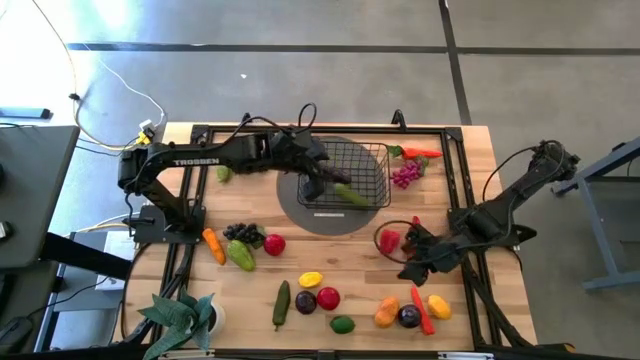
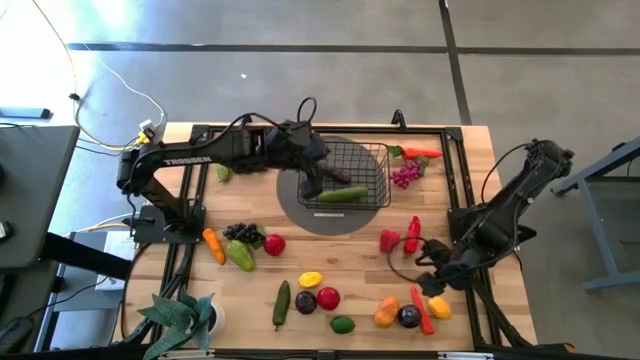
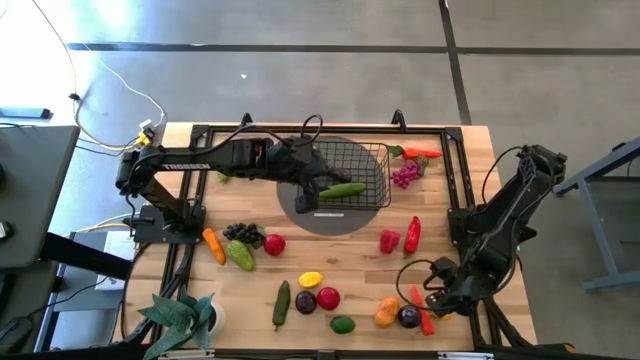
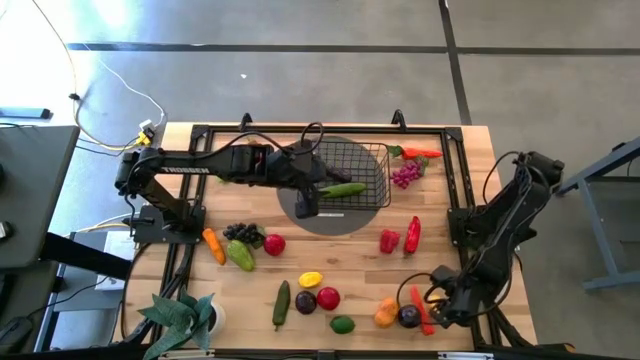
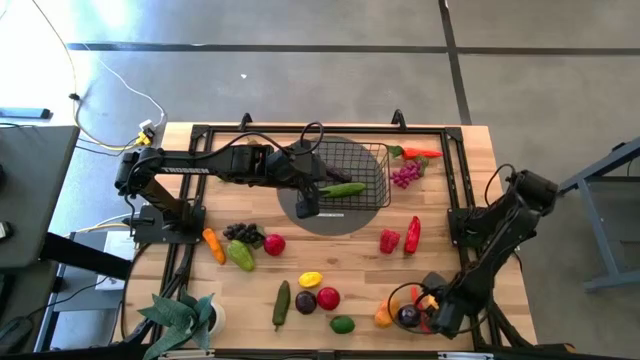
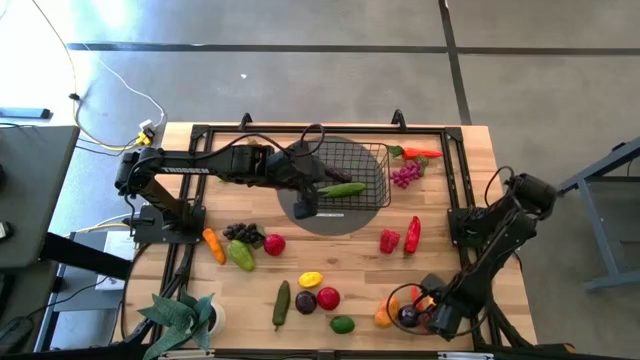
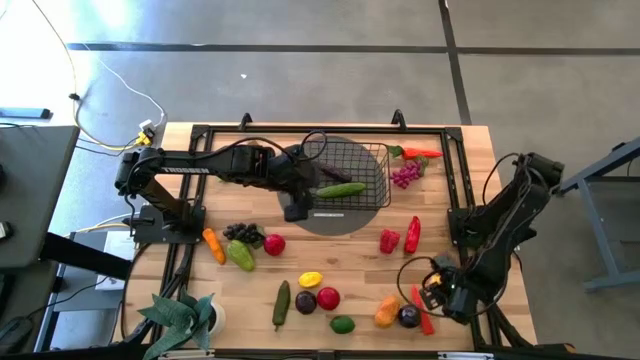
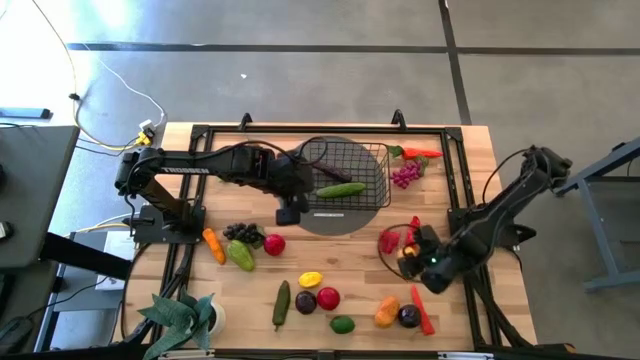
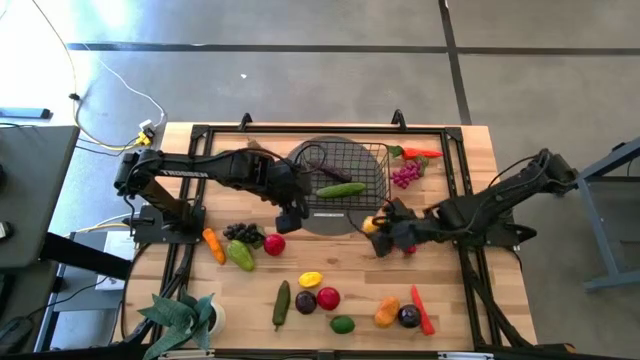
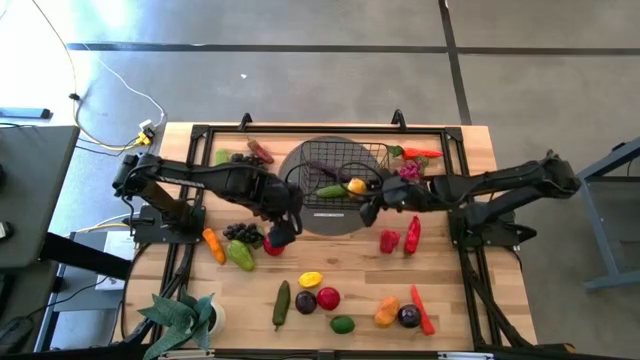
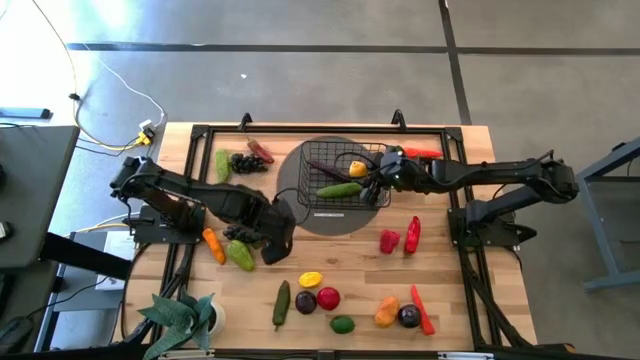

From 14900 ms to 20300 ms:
Task: Build produce basket
Put the right yellow lemon into the black mesh basket

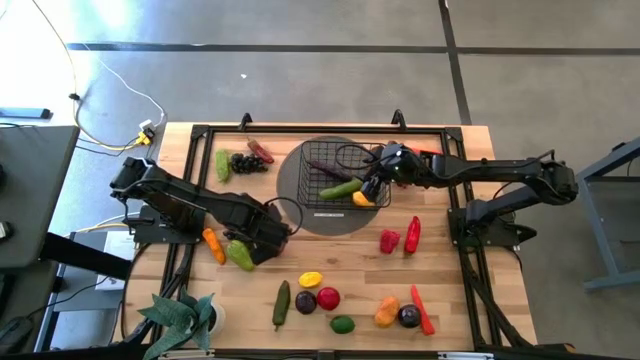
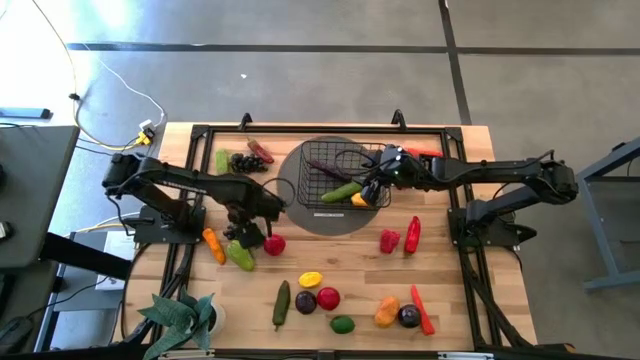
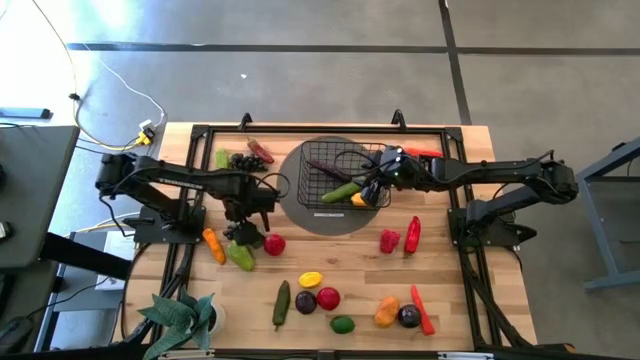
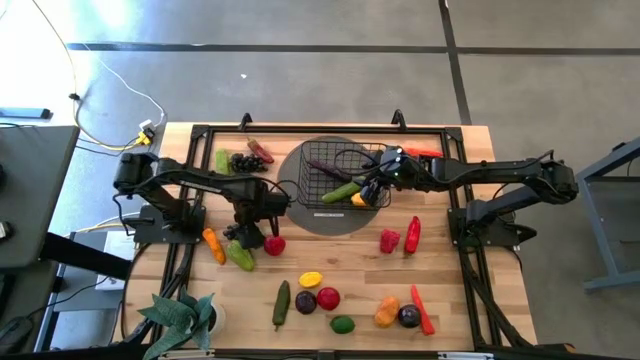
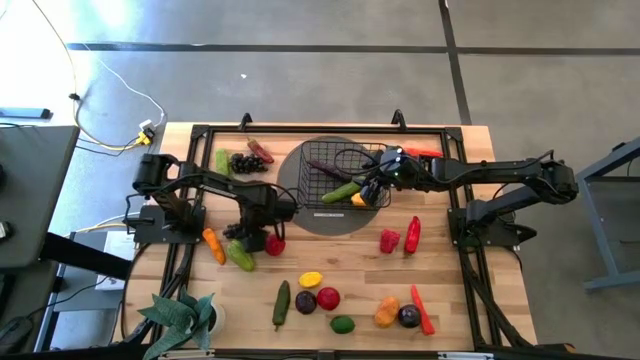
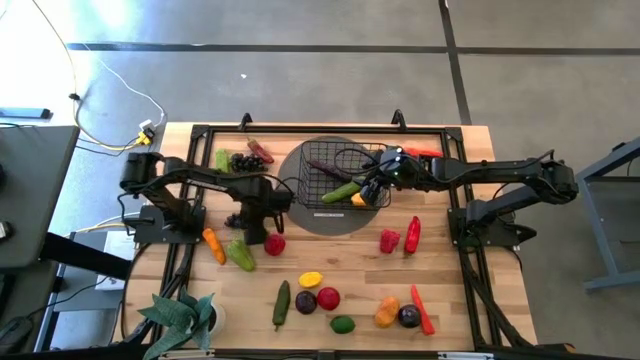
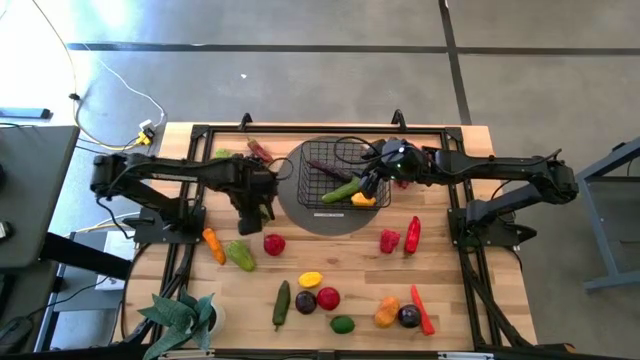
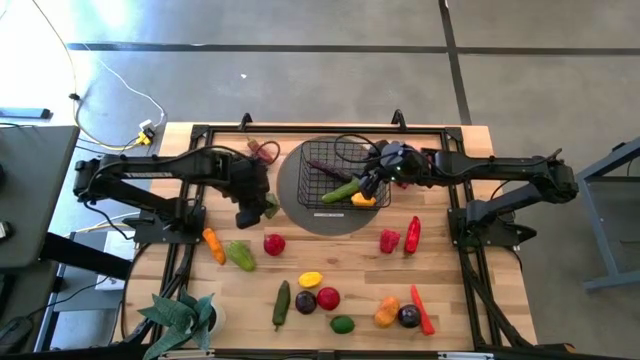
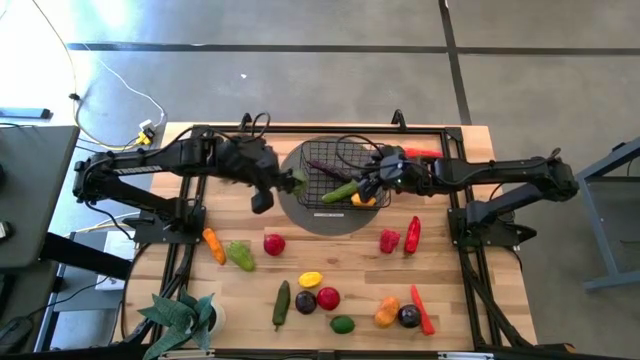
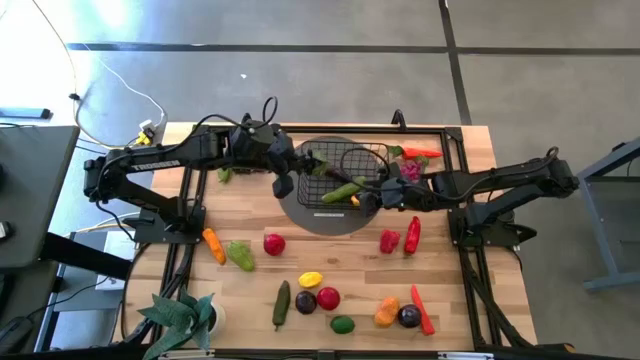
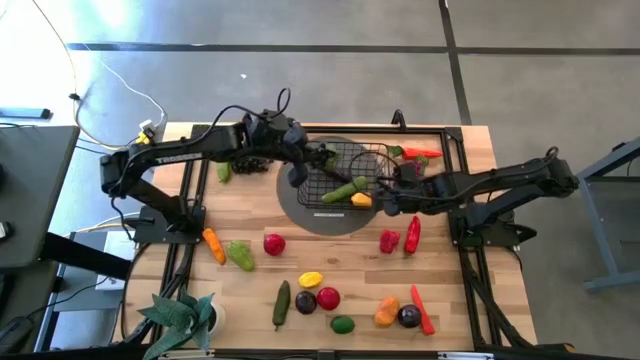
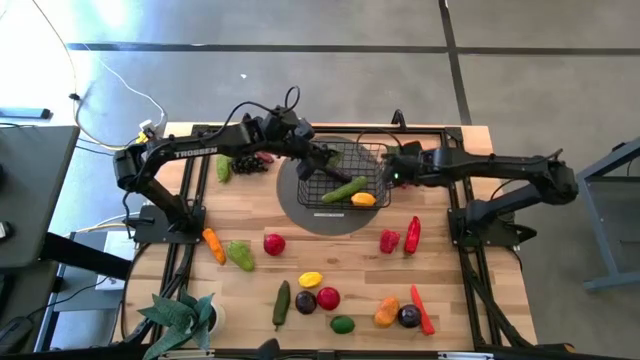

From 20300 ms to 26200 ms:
Put the bottom black grapes into the black mesh basket

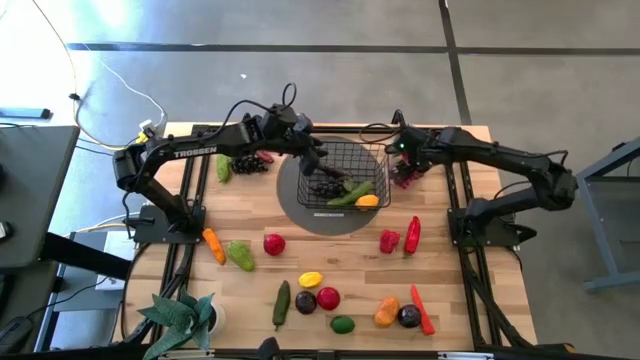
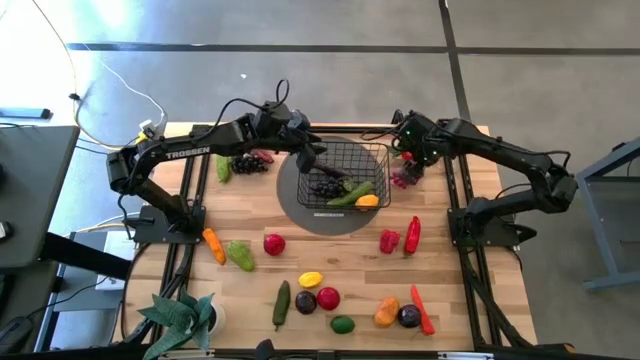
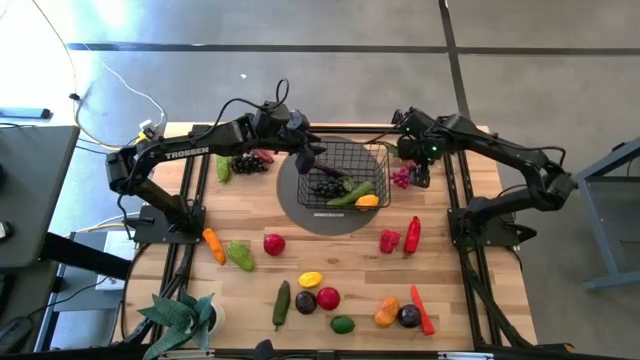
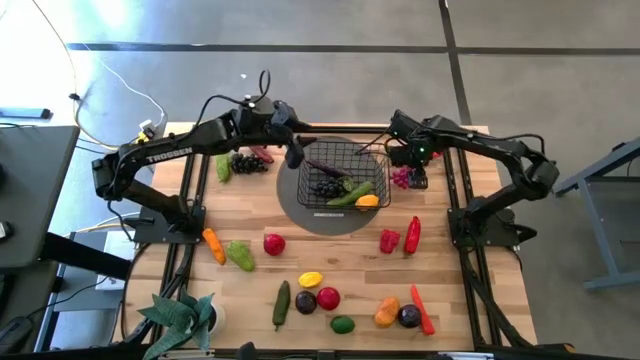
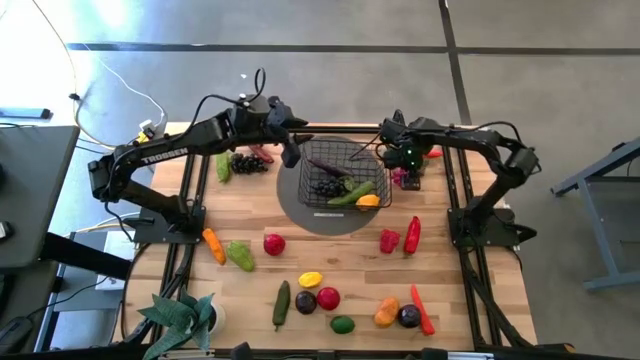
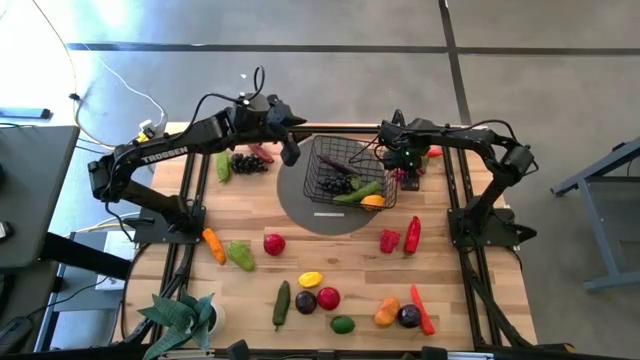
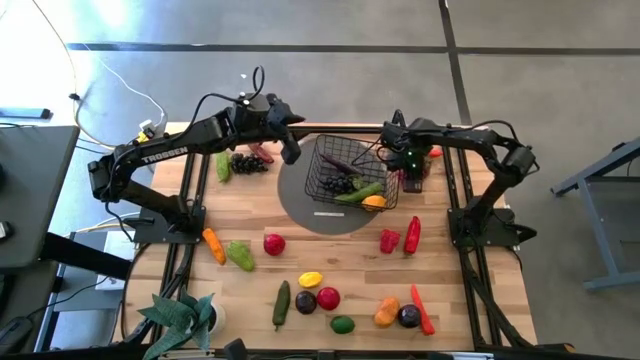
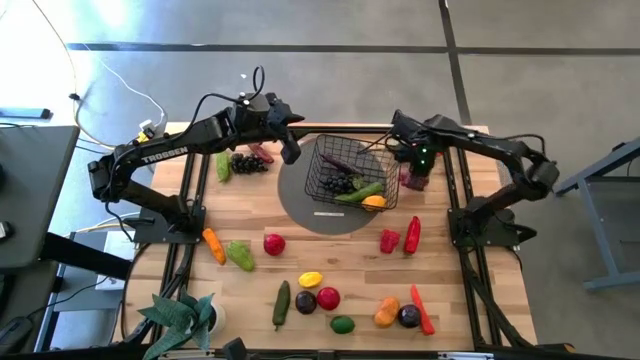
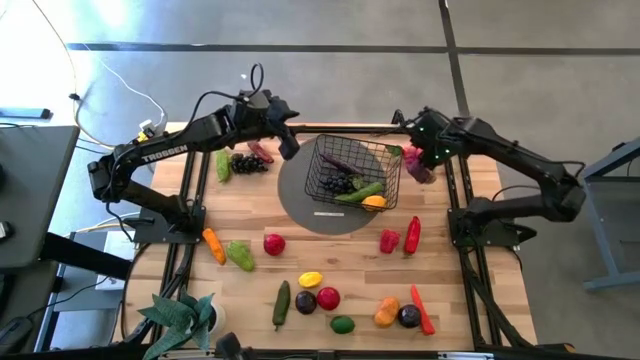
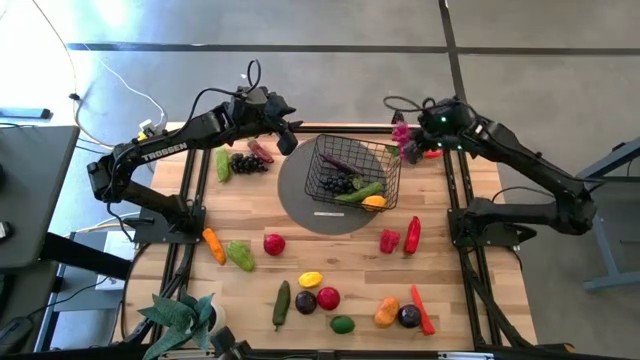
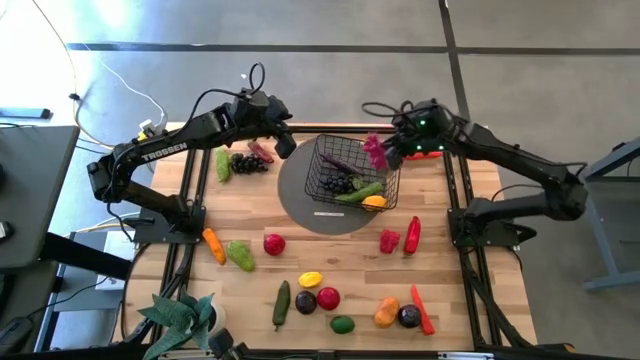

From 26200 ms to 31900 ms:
Put the purple grapes into the black mesh basket

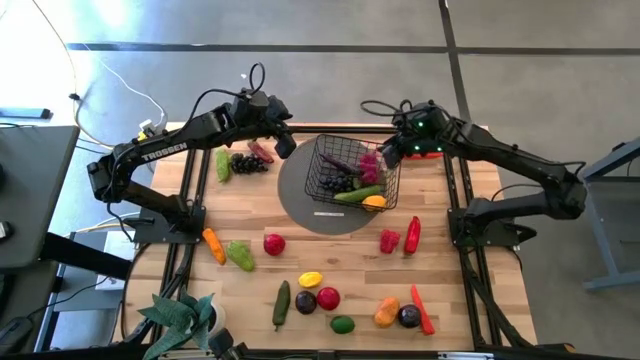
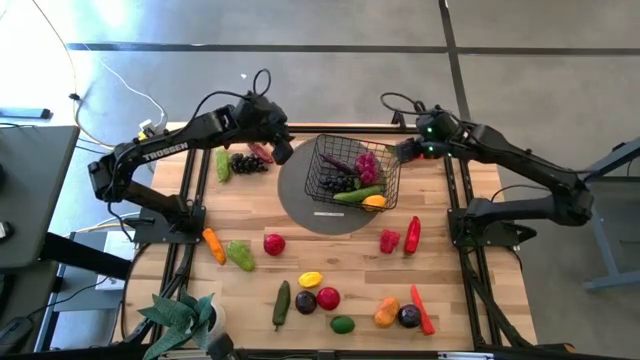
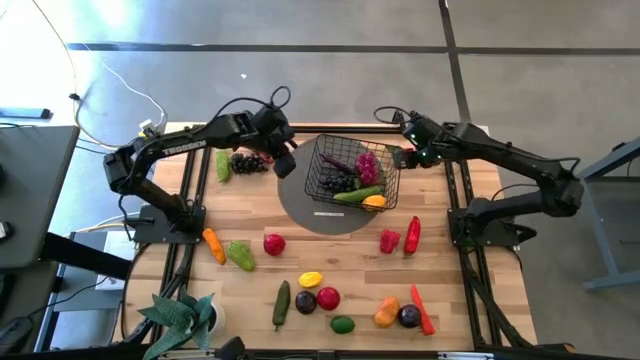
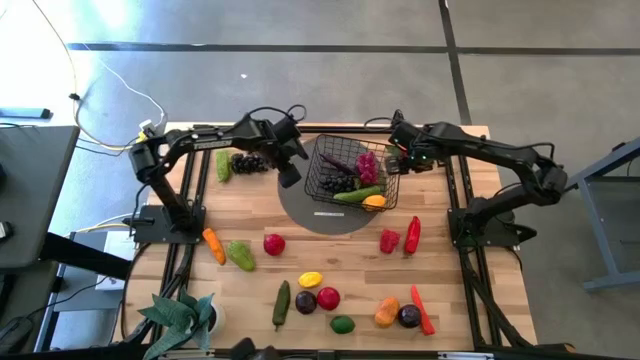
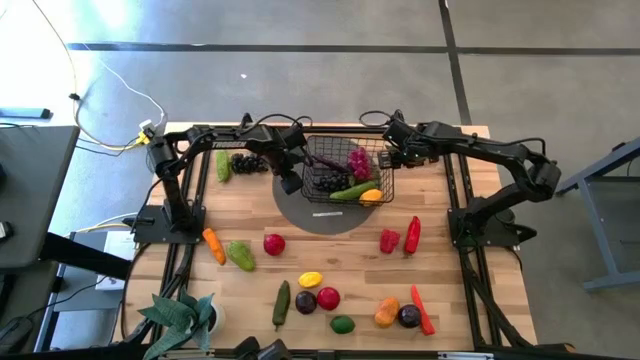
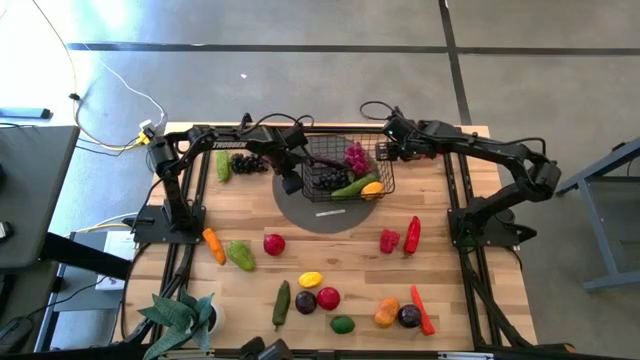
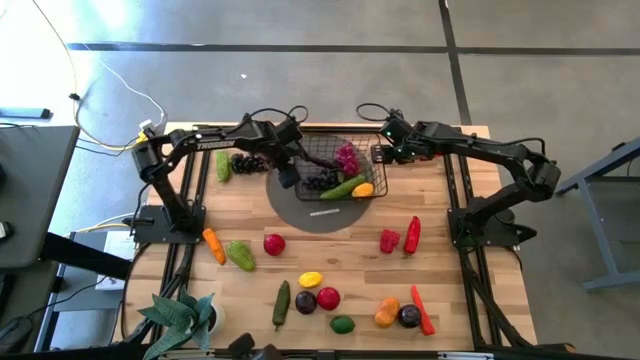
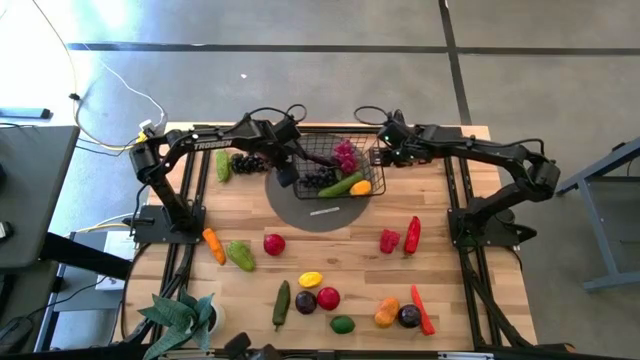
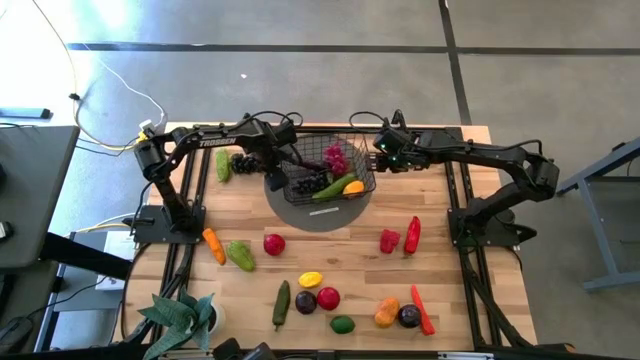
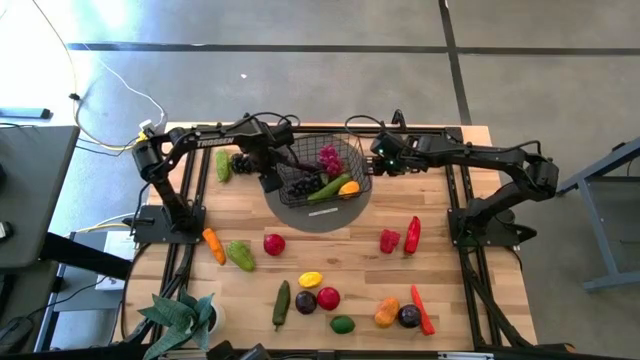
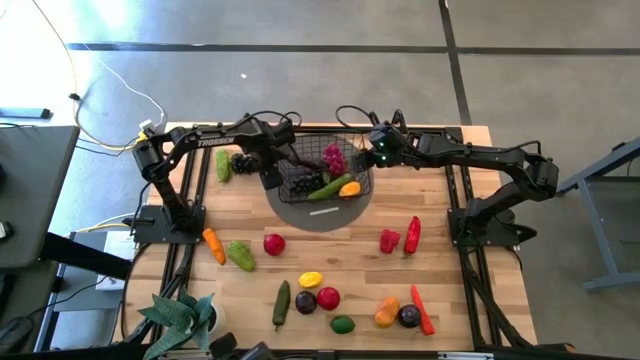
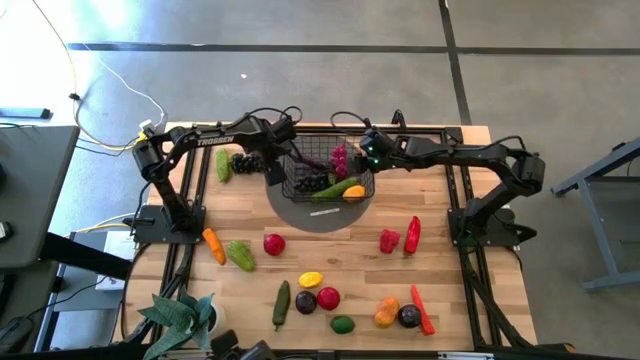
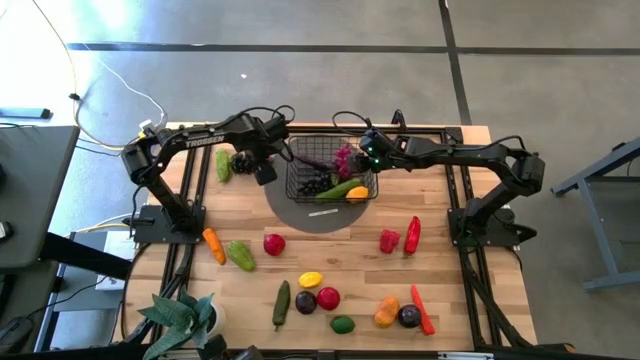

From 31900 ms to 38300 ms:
Adjust the black mesh basket
